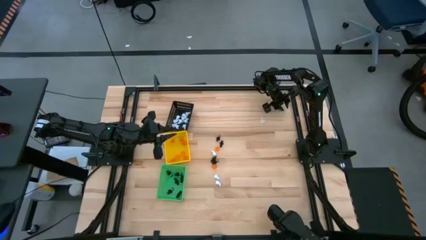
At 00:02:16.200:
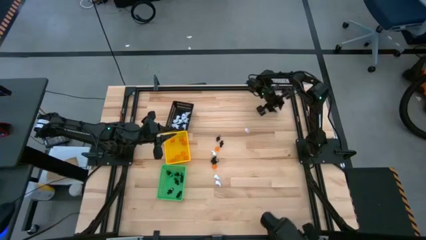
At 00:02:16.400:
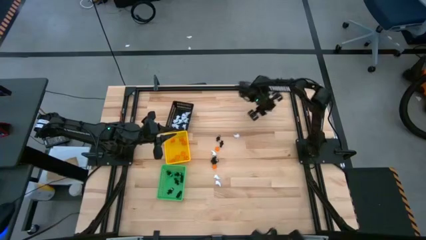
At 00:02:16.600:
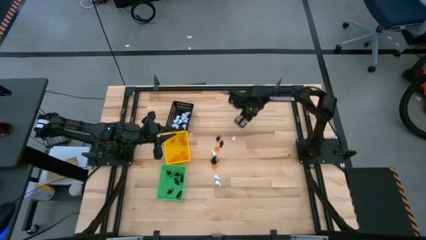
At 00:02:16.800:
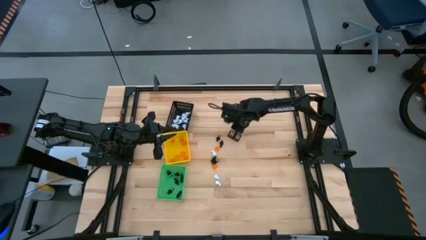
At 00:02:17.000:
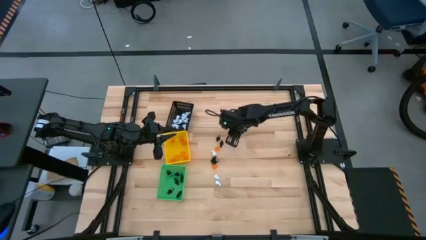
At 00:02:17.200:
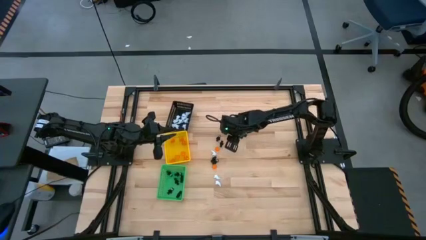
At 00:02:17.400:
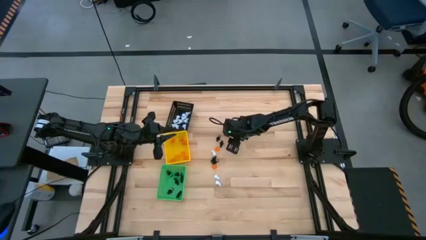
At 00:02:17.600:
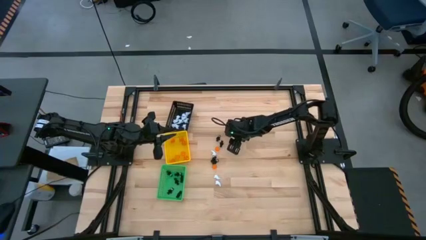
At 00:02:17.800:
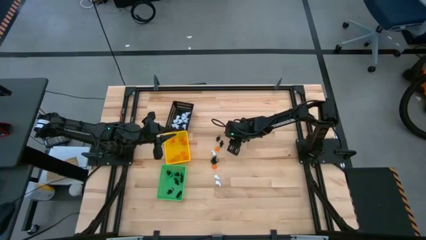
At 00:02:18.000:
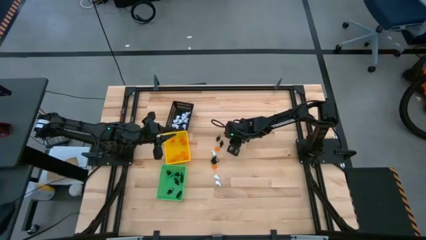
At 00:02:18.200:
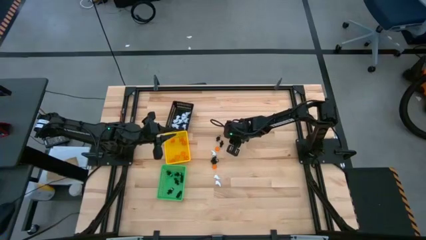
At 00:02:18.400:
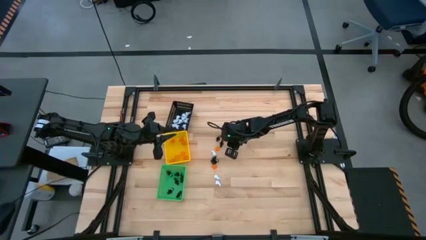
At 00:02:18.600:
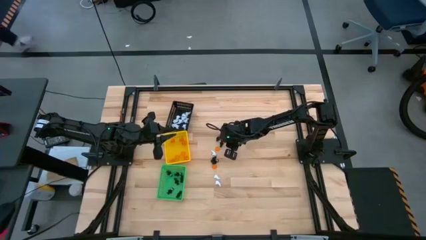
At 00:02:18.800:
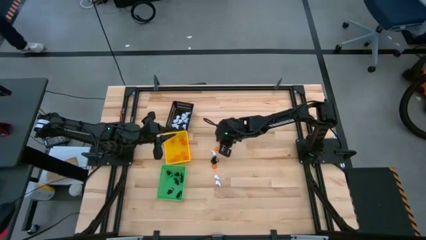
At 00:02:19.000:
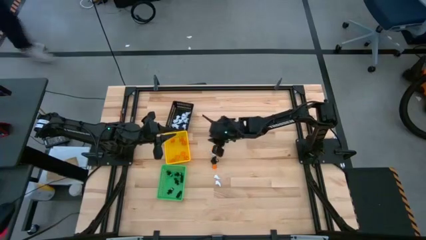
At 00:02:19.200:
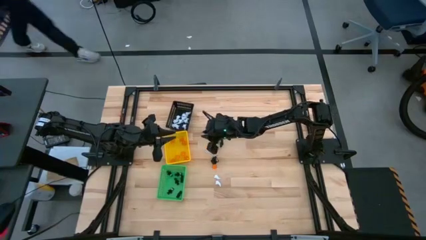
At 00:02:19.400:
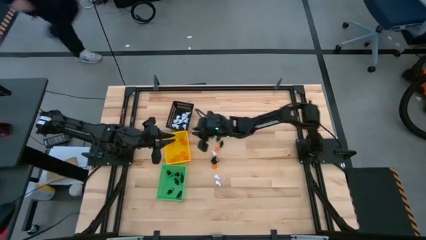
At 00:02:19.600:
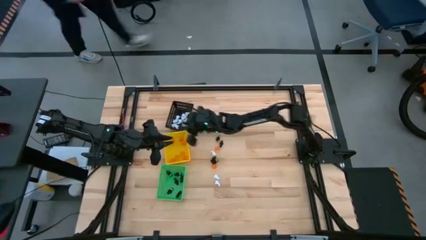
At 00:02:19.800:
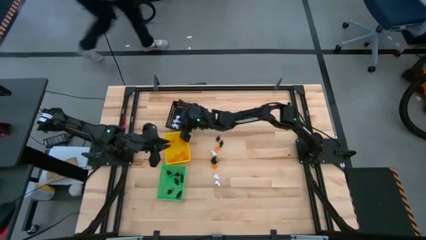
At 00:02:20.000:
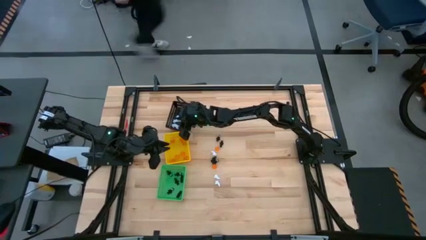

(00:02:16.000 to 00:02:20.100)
Task: Sort Halloween decoration
Put the white ghost plush toy into the black basket

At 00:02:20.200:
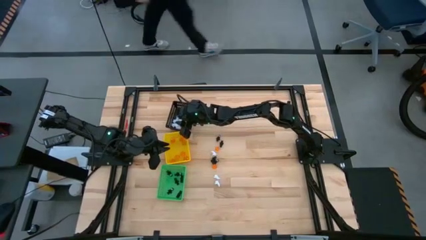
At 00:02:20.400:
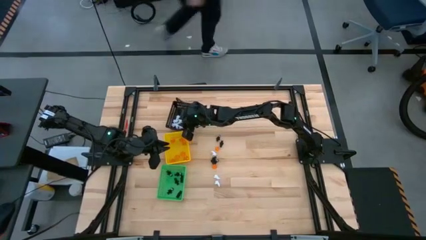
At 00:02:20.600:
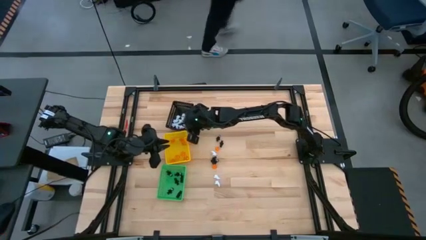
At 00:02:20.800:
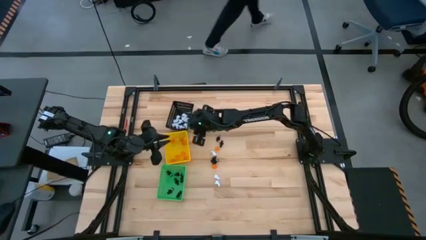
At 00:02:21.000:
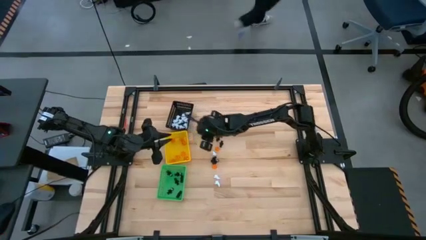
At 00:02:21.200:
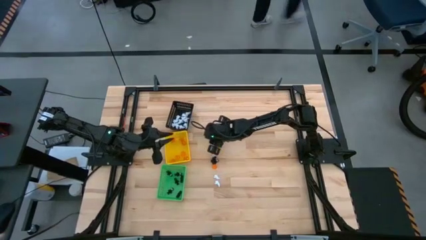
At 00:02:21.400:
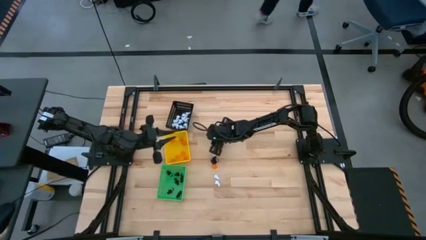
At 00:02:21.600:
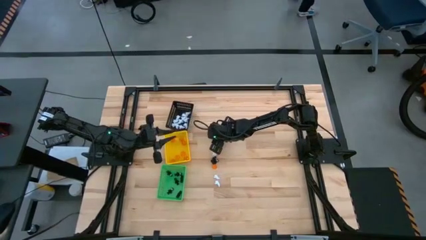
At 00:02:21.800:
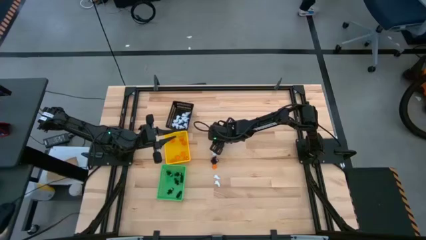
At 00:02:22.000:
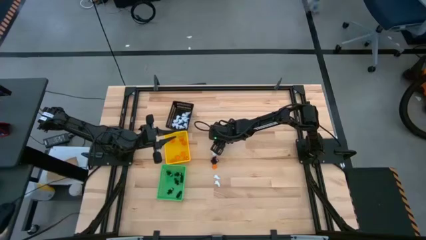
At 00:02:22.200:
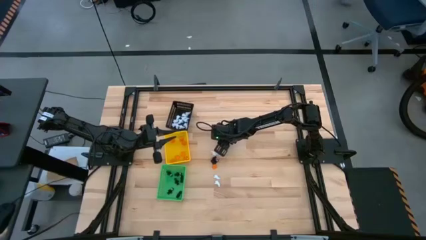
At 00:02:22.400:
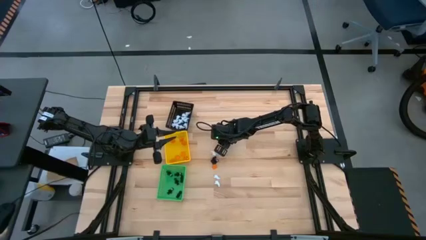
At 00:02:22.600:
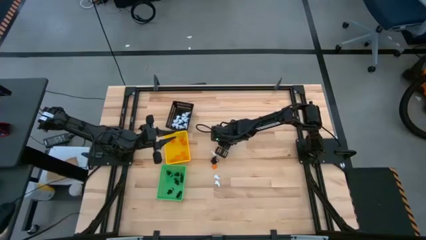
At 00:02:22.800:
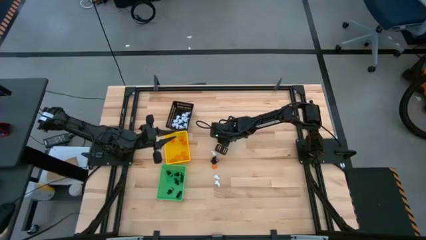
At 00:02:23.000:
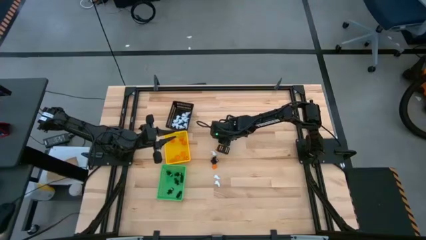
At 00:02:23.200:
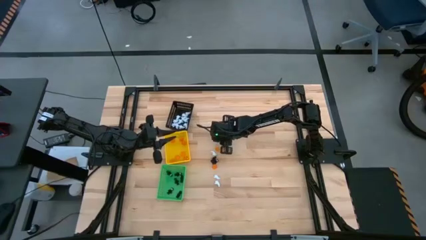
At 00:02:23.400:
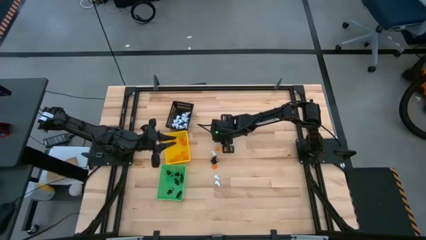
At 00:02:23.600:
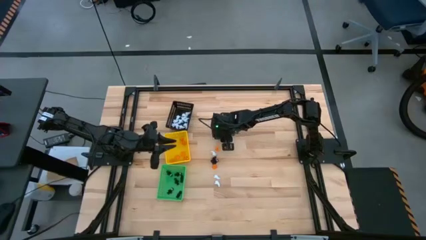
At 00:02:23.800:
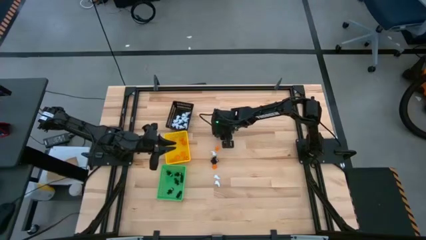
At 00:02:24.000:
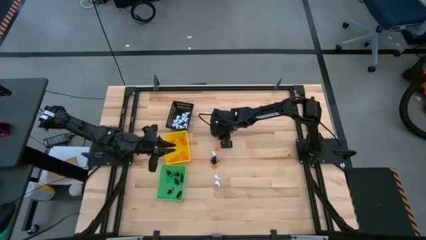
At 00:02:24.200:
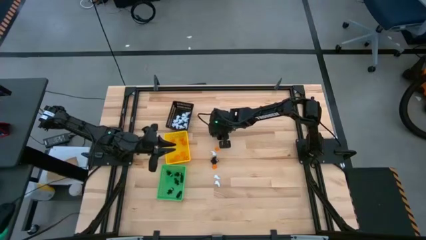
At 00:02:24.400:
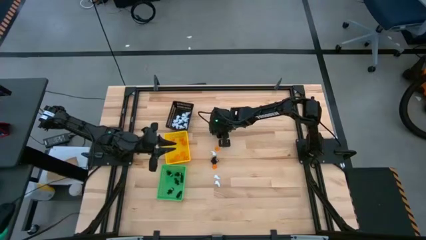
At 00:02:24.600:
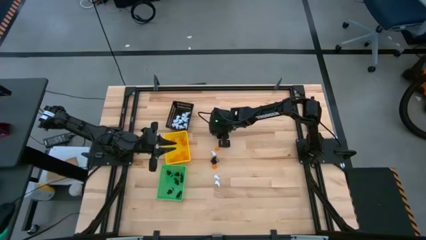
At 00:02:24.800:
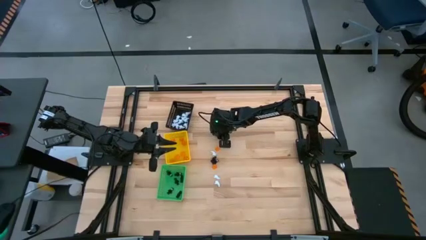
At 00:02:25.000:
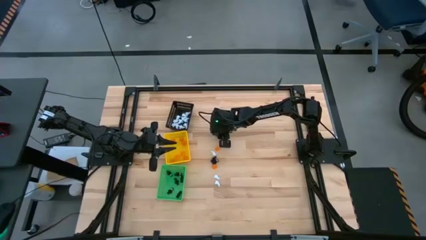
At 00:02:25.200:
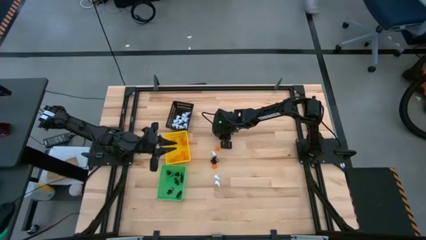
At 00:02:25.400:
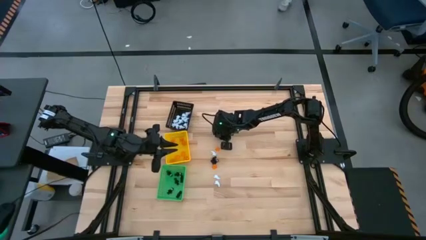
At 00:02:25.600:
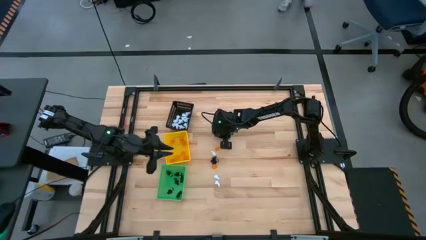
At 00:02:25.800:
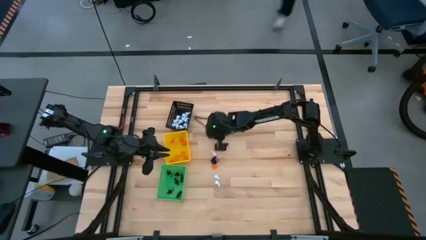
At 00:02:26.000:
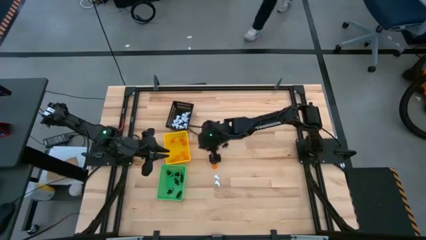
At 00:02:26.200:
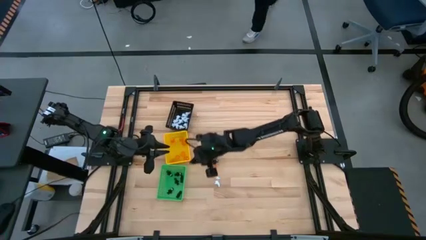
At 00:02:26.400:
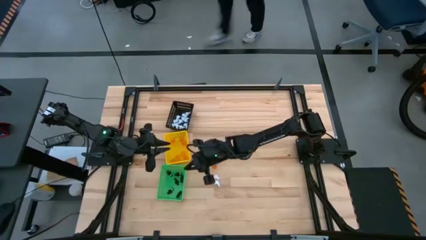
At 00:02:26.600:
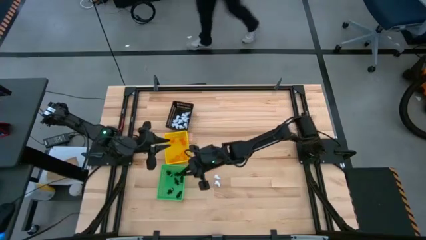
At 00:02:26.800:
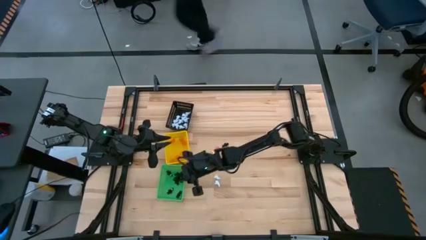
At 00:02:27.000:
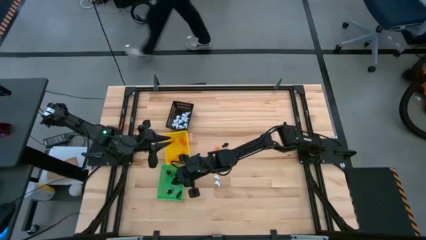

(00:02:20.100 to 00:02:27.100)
Put the black skeleton toy into the green basket

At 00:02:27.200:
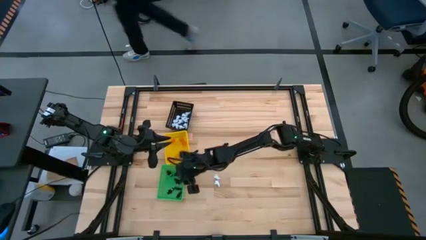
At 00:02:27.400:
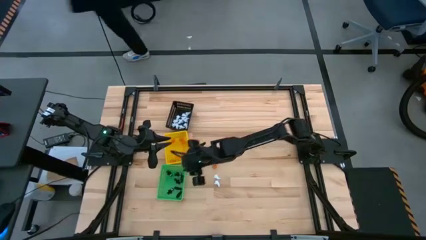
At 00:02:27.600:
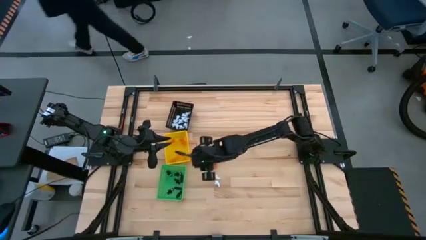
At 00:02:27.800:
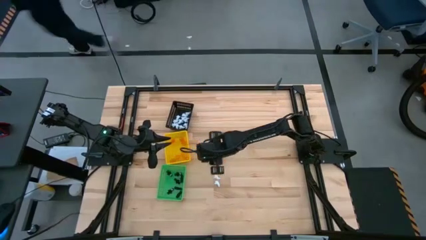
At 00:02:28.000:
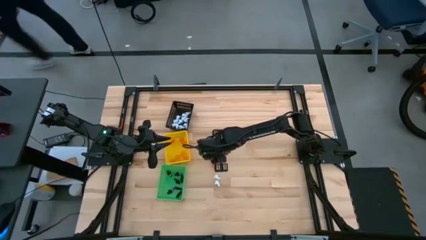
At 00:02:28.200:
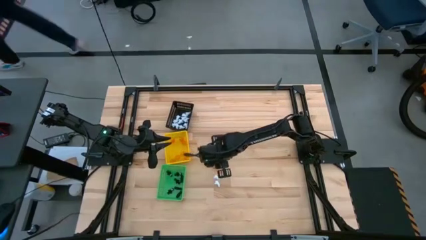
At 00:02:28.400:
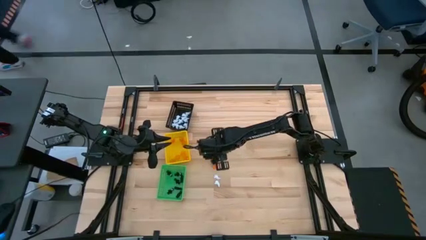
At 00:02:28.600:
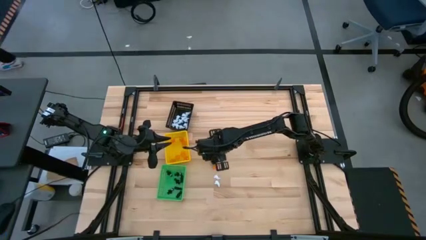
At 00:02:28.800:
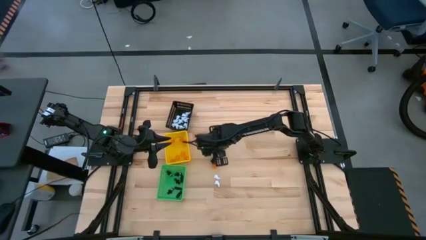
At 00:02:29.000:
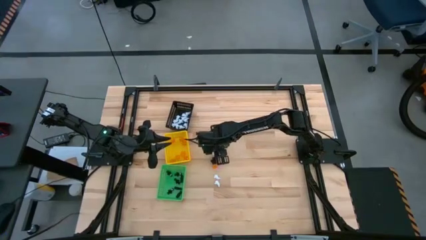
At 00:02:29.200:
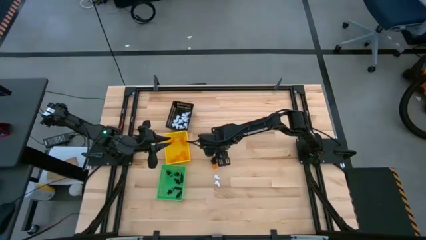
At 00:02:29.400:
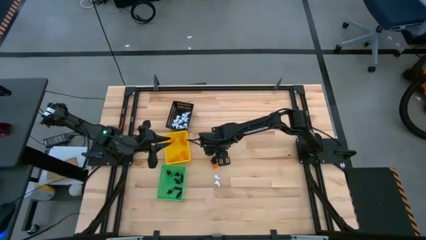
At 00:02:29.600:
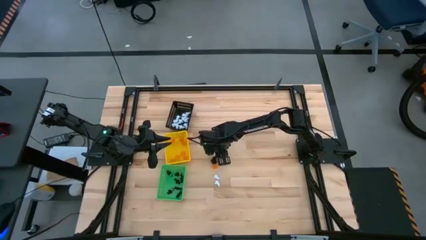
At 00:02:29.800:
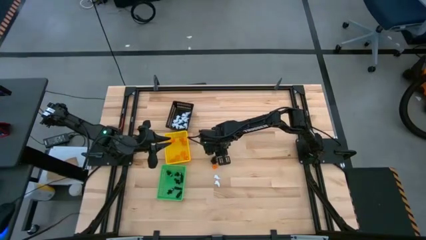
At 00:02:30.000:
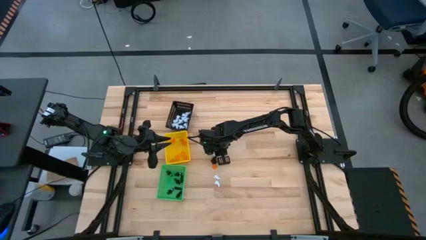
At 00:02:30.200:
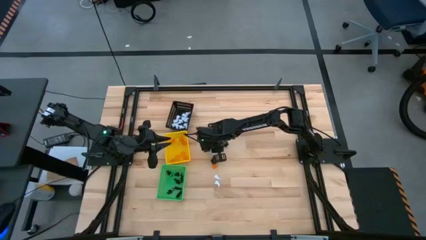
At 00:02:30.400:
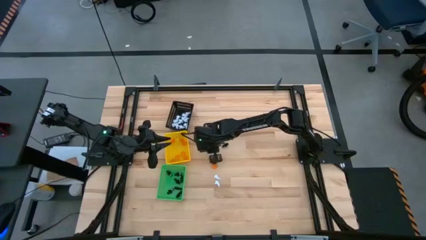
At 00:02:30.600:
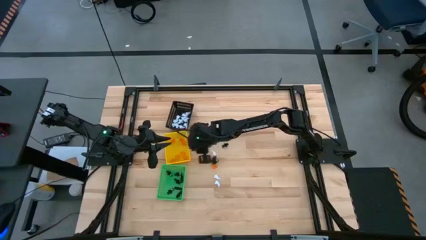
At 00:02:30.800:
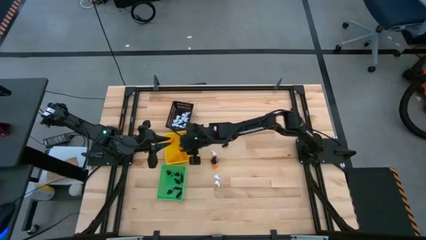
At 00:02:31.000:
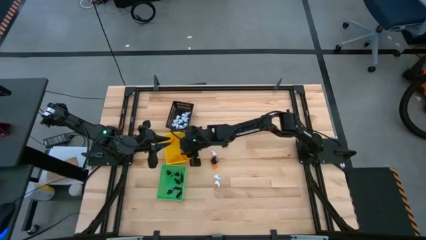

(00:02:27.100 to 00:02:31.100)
Put the orange pumpkin toy into the yellow basket
